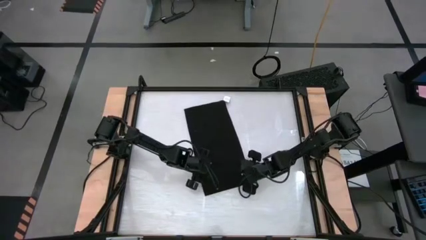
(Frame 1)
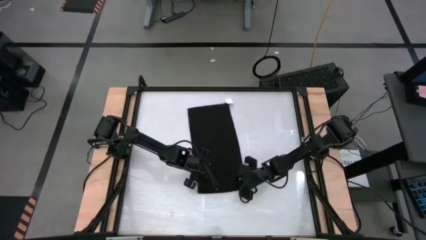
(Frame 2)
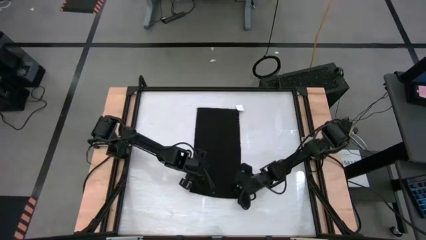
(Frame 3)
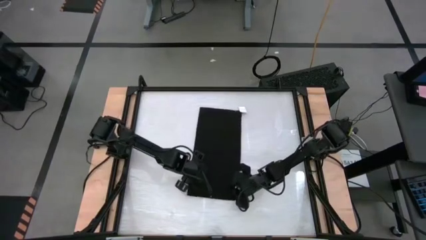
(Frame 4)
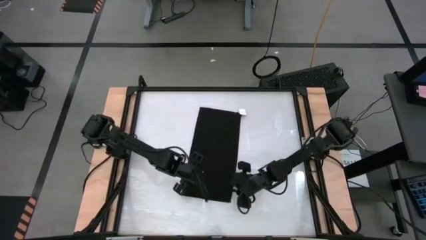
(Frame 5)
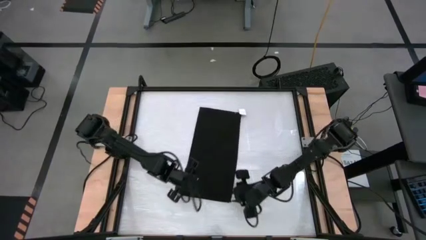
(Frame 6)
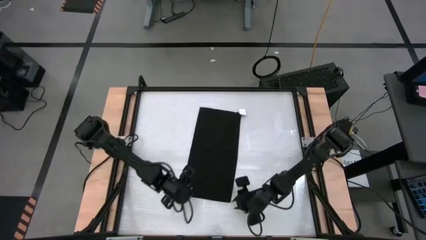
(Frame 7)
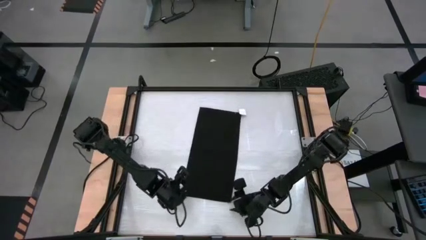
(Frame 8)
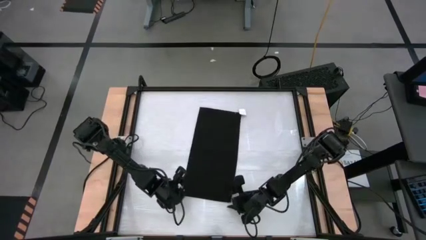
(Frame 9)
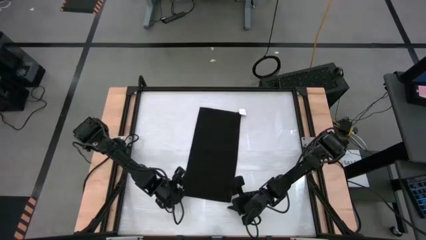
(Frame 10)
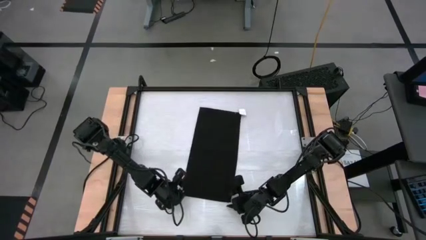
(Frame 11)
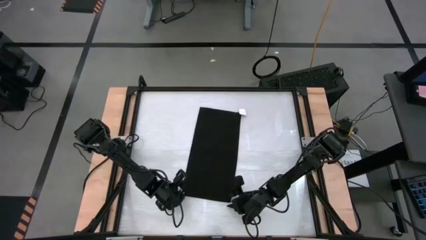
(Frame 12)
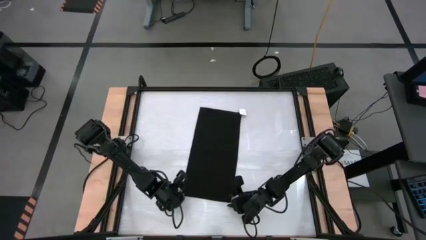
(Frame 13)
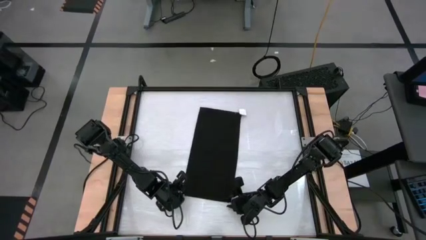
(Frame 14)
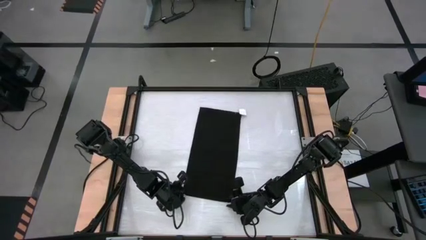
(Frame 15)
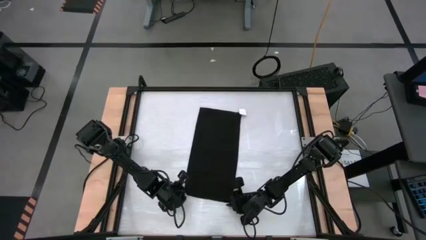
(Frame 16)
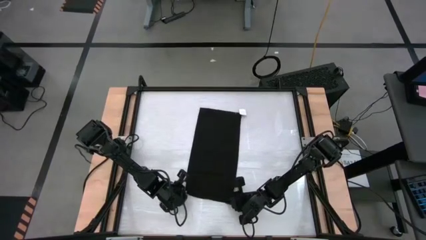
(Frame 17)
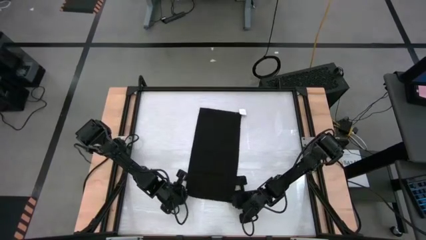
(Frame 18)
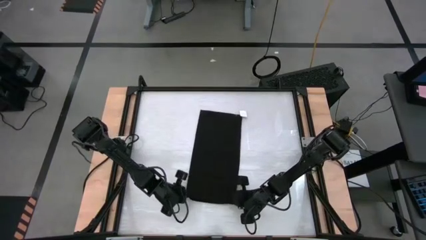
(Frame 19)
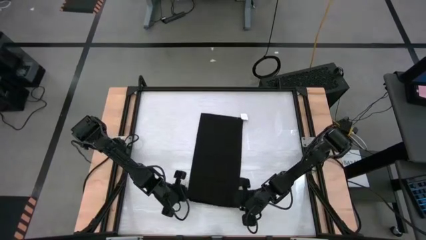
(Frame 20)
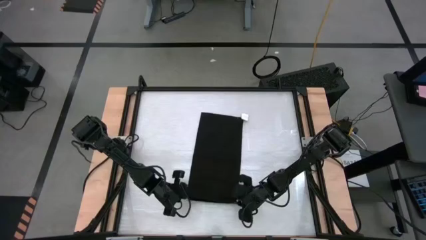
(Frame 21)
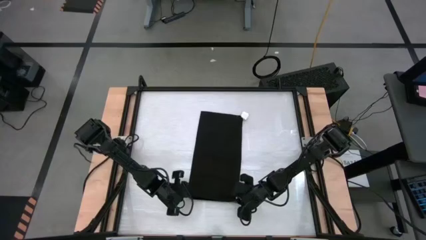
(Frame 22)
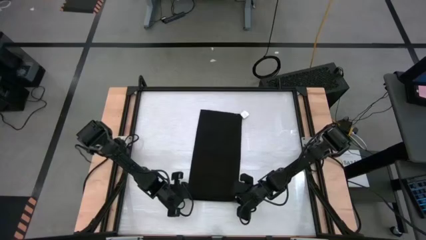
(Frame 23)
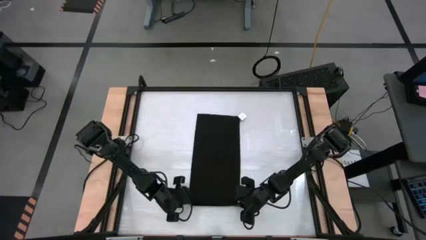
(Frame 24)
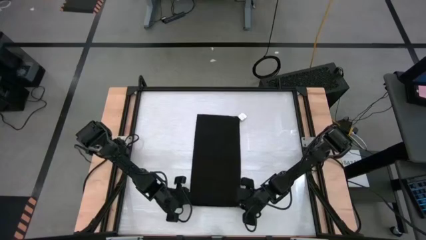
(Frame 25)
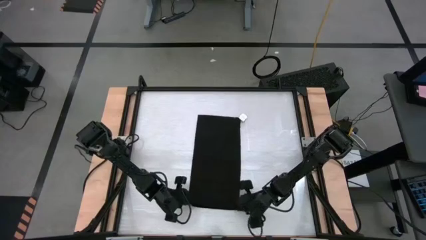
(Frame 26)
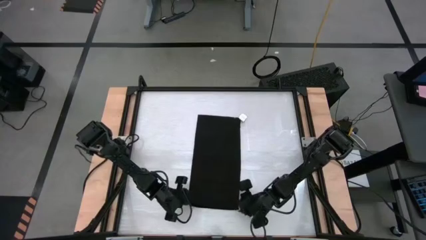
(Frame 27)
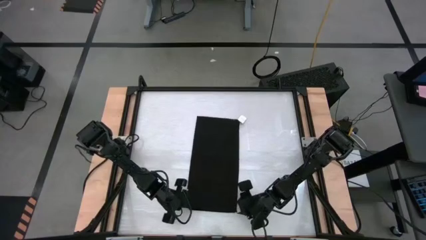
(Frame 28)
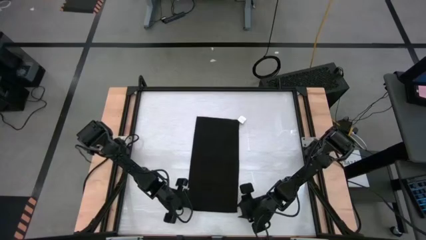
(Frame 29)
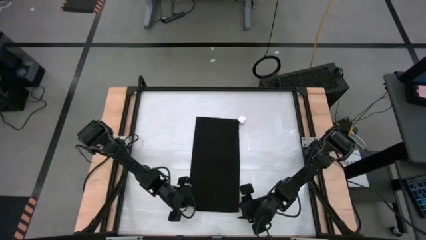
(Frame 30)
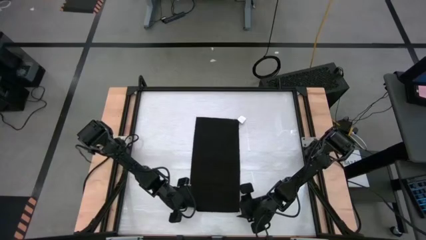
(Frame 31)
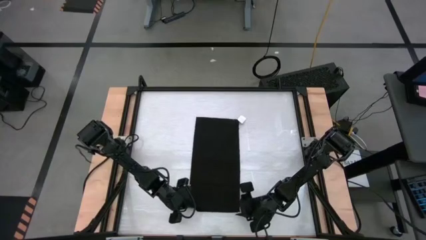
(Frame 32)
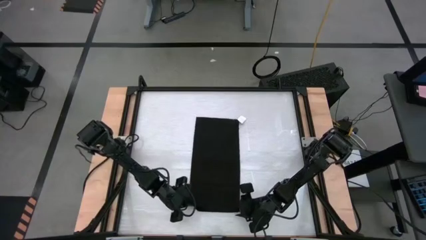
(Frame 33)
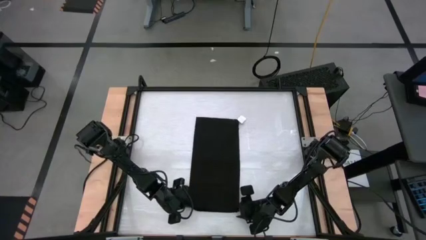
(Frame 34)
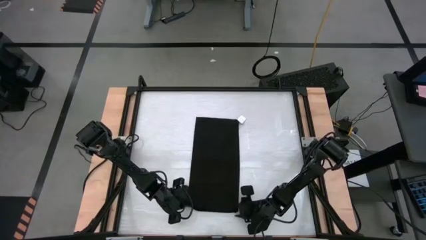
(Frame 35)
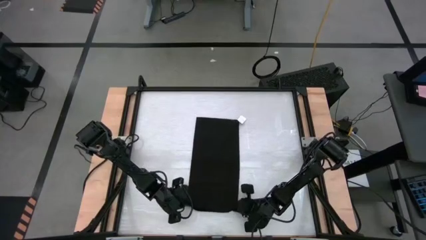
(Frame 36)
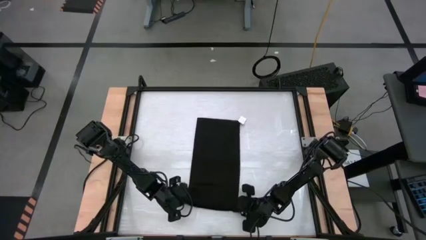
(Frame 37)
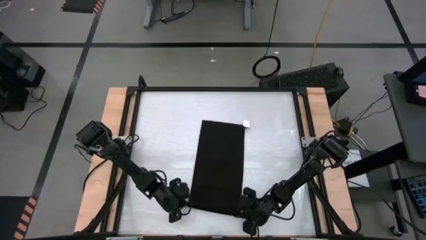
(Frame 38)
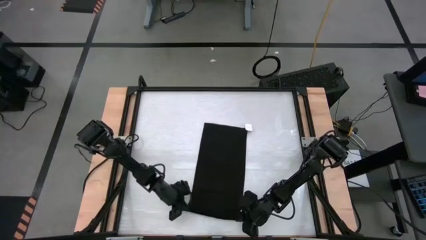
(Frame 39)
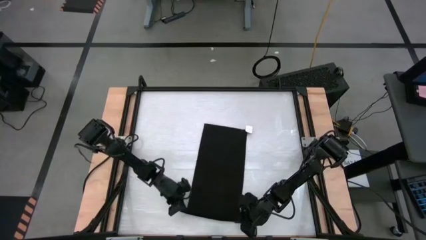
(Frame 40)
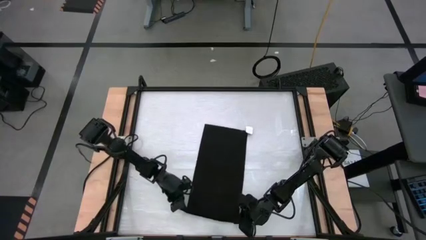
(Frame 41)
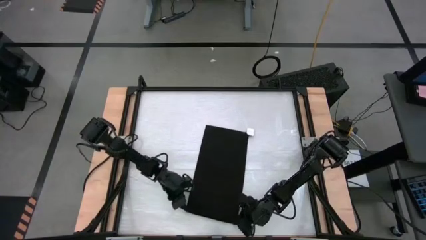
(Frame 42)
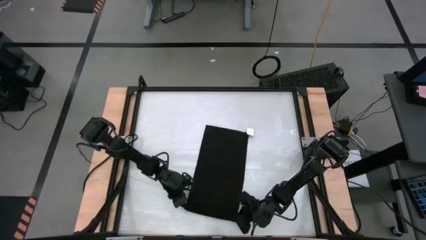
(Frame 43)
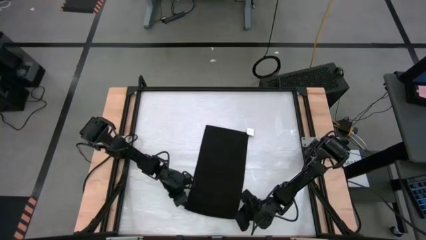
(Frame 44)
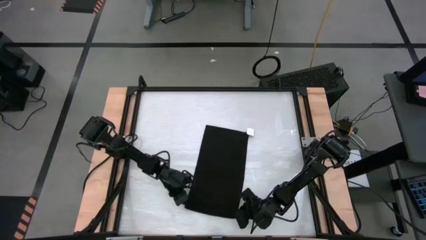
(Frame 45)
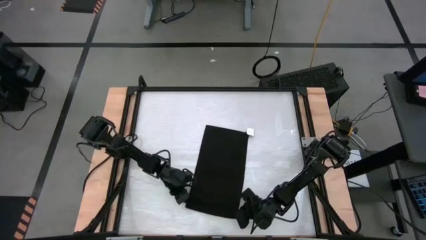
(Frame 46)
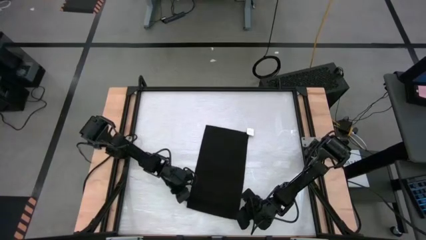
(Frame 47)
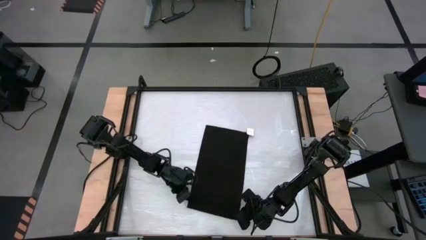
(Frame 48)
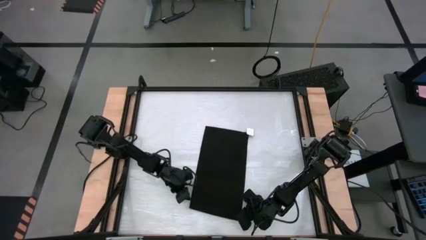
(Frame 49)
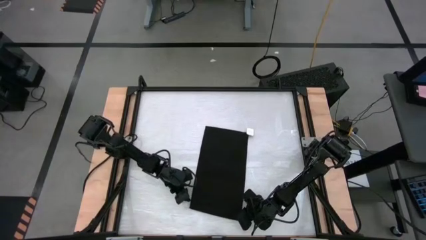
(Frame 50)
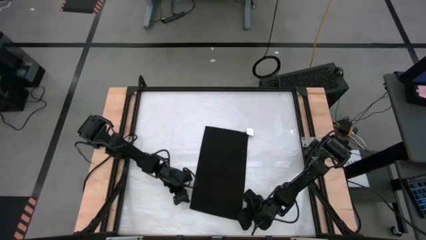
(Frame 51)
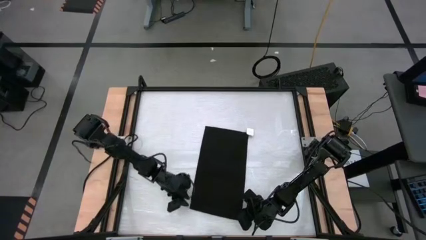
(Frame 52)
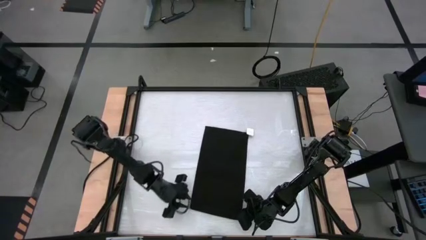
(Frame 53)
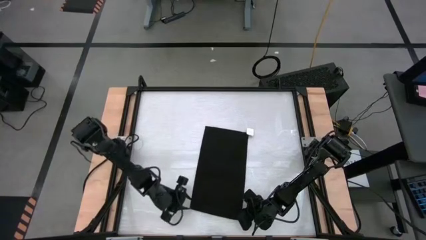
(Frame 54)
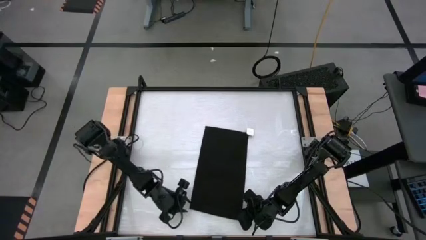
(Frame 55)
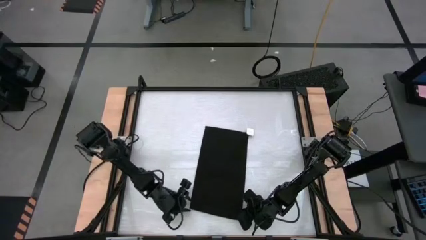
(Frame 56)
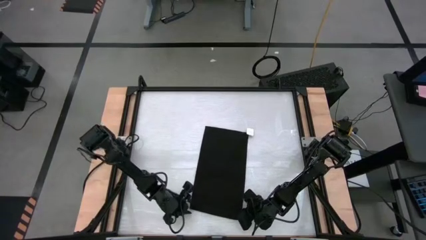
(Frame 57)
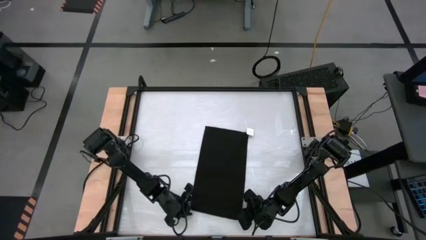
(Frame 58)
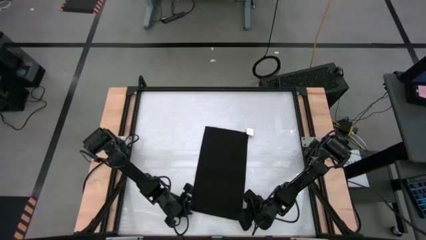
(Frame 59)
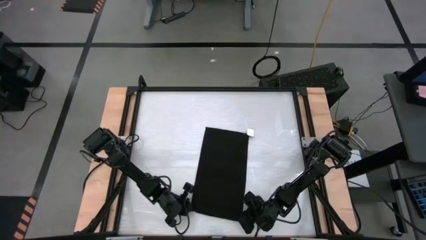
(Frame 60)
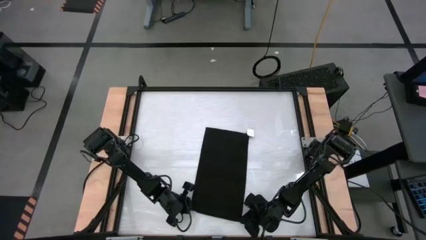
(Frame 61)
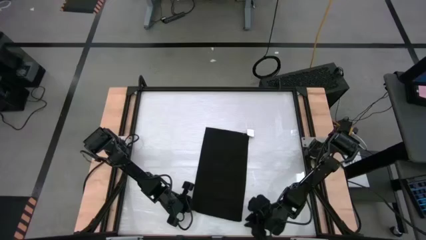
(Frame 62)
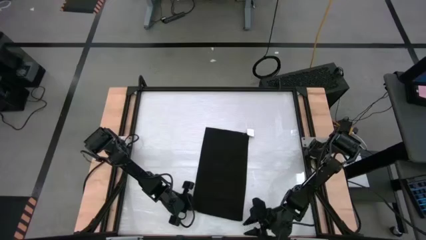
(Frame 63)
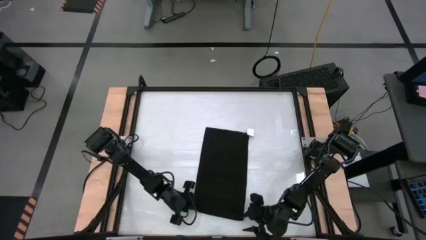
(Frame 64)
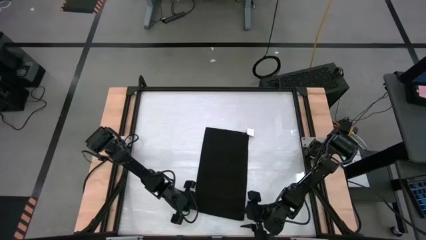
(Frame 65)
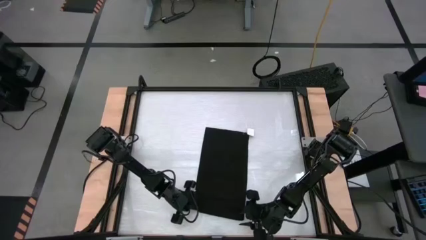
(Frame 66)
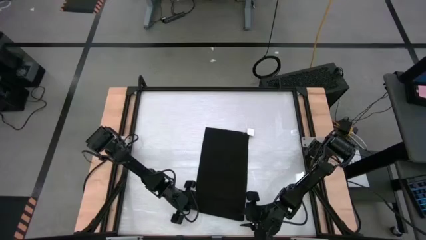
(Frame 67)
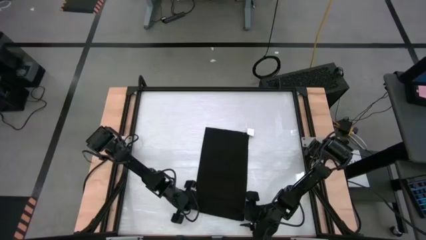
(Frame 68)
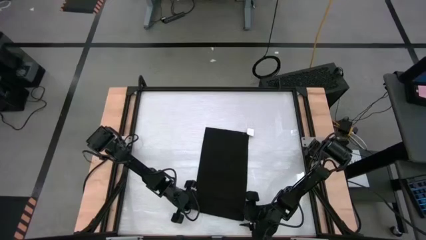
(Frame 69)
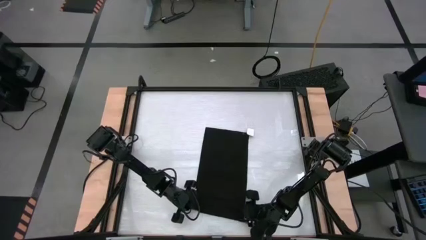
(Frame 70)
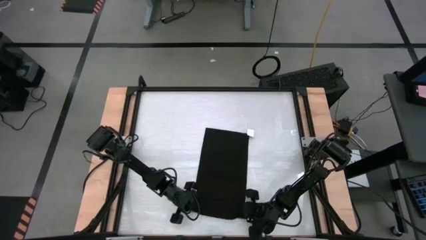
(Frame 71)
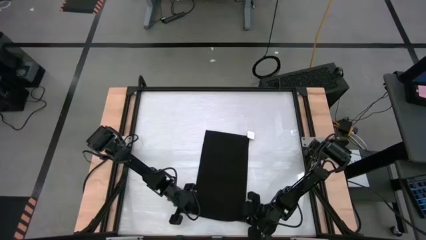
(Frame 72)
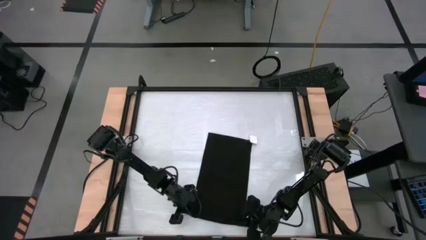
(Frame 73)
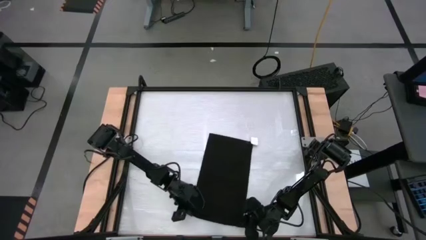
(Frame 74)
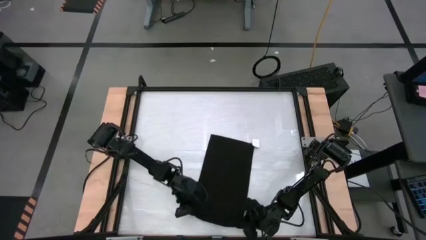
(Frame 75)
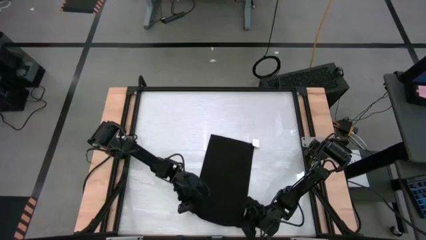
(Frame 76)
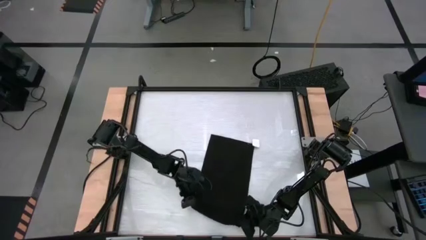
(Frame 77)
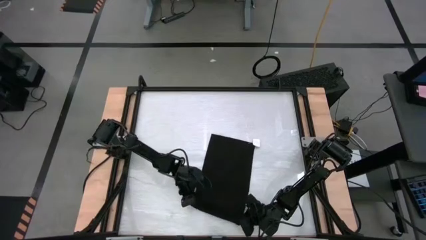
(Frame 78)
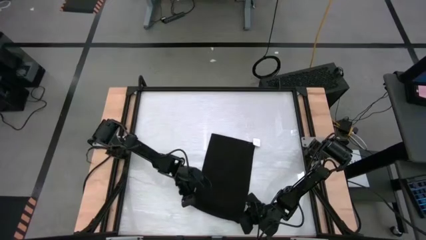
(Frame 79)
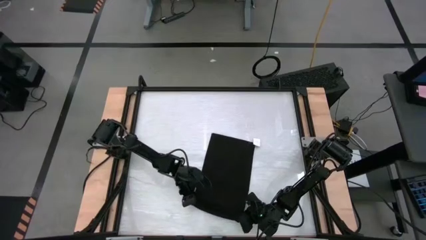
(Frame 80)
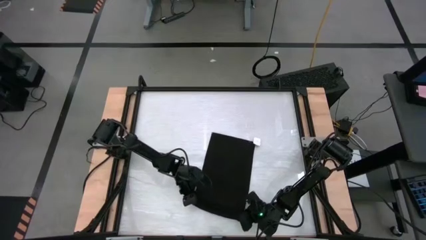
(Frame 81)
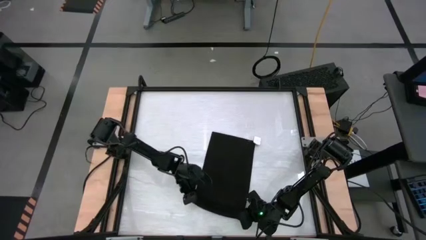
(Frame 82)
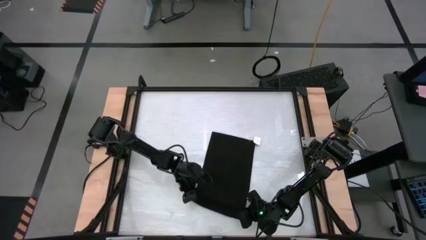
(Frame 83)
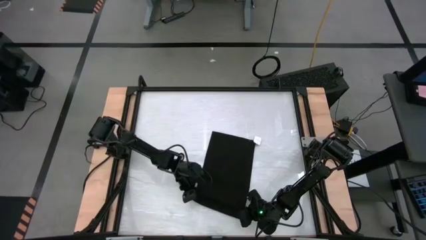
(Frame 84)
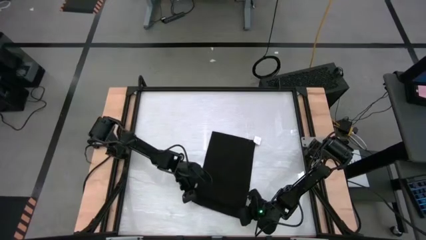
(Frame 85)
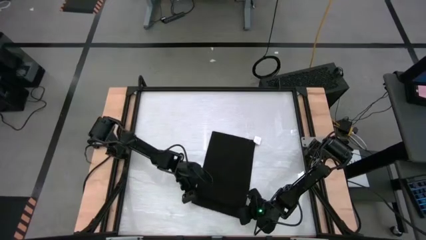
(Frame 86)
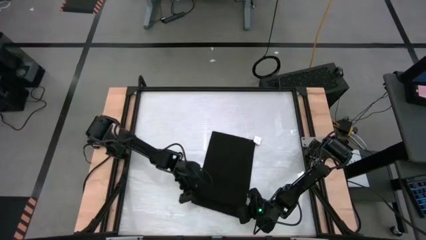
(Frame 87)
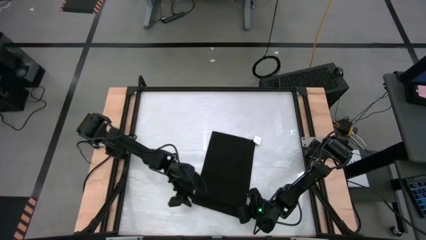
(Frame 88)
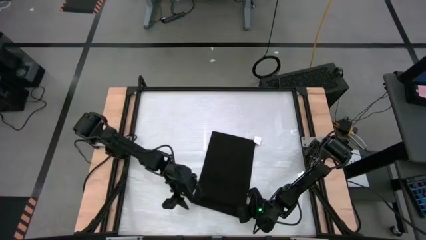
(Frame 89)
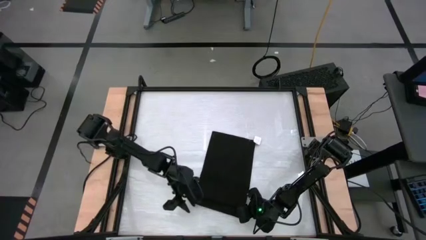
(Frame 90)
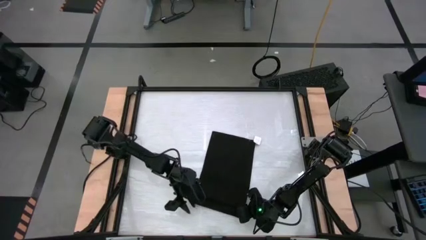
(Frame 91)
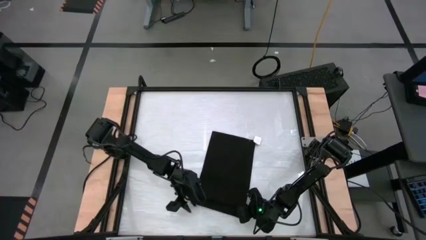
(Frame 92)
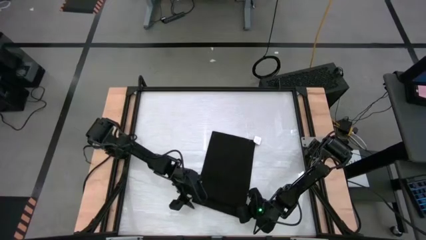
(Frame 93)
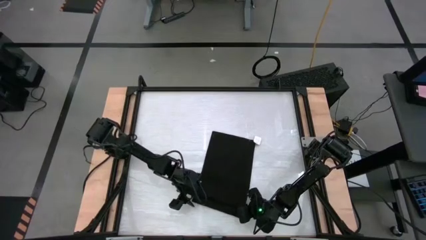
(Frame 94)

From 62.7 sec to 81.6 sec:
Task: Roll napkin
Roll the black napkin
